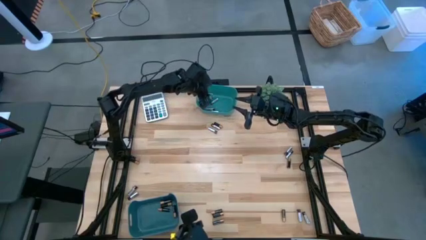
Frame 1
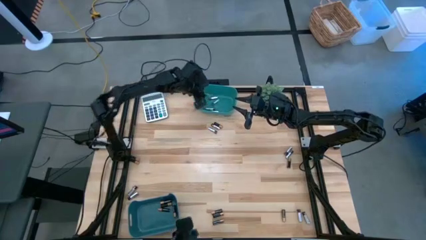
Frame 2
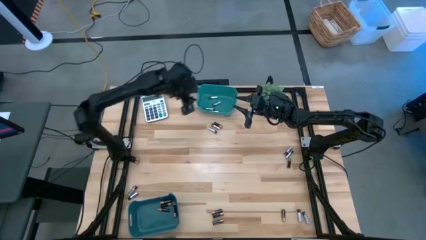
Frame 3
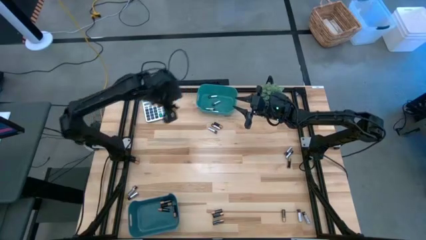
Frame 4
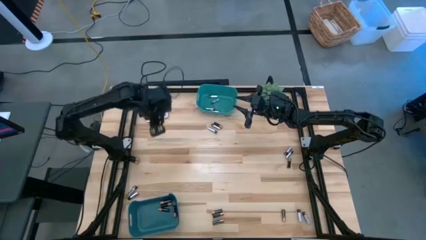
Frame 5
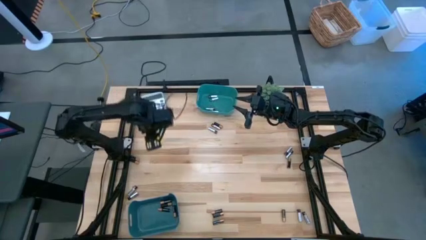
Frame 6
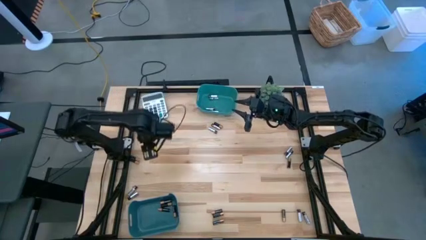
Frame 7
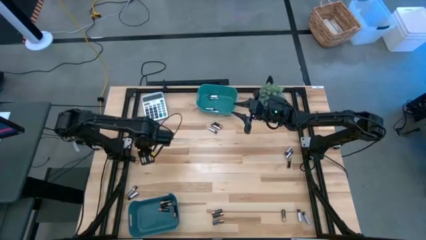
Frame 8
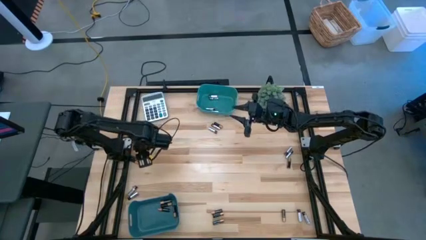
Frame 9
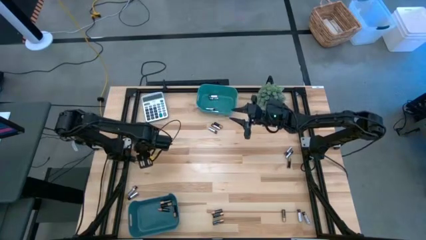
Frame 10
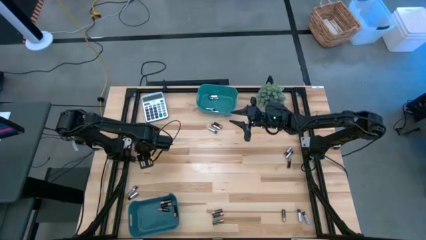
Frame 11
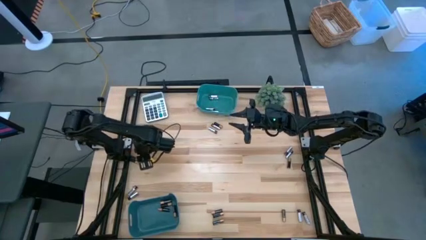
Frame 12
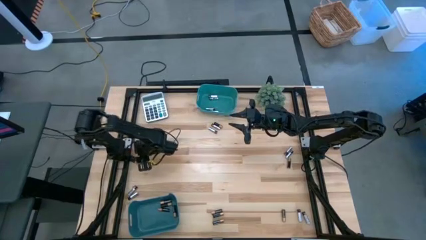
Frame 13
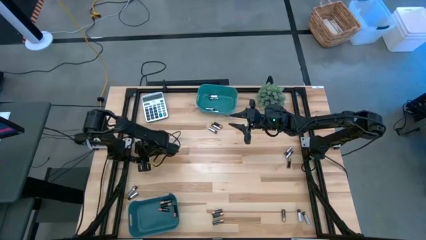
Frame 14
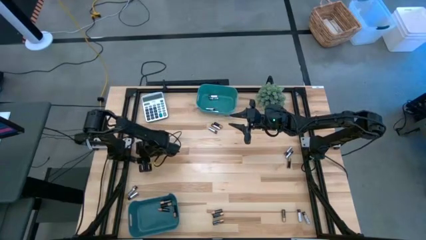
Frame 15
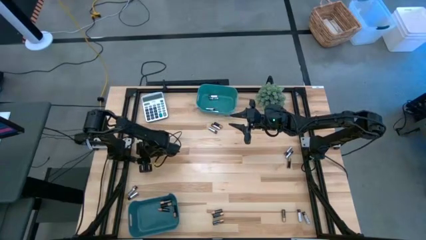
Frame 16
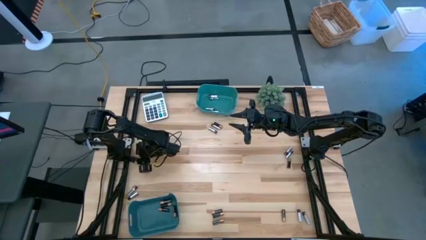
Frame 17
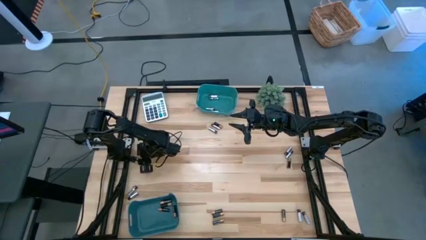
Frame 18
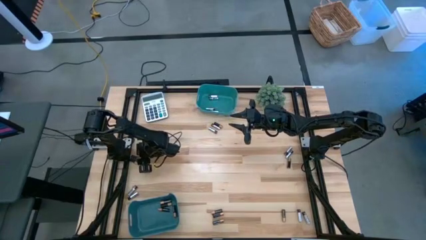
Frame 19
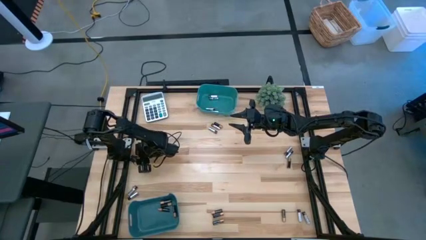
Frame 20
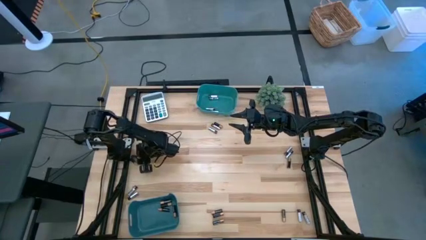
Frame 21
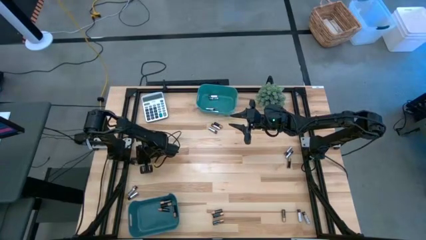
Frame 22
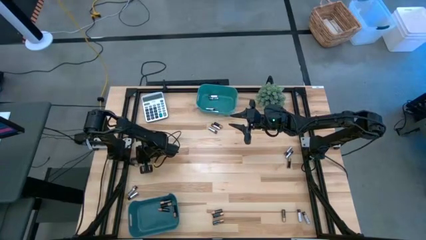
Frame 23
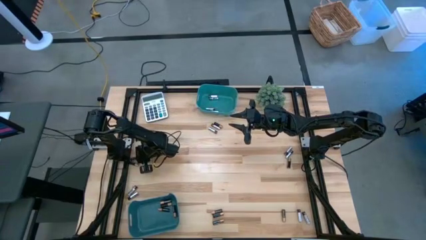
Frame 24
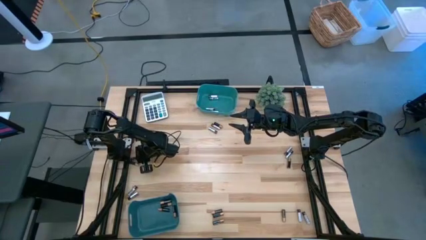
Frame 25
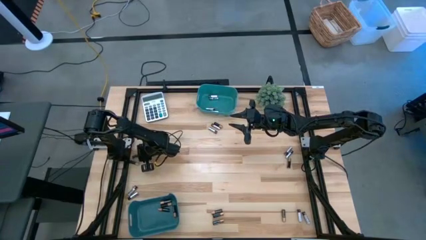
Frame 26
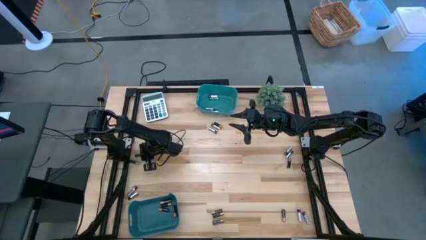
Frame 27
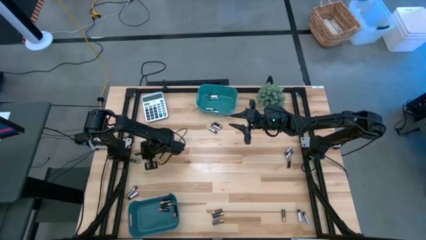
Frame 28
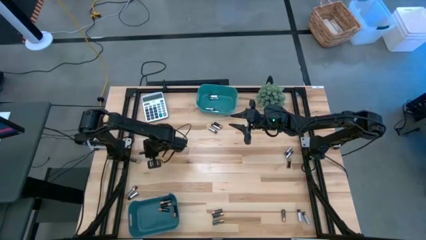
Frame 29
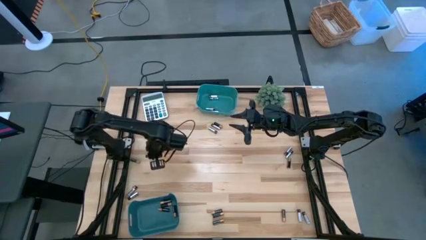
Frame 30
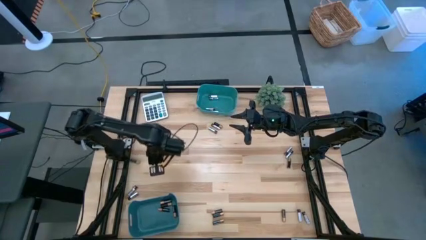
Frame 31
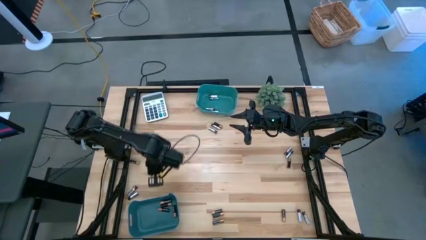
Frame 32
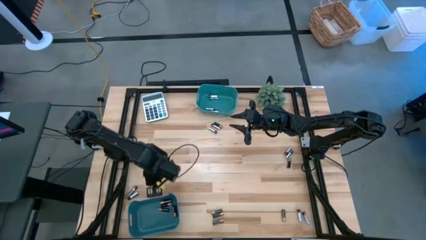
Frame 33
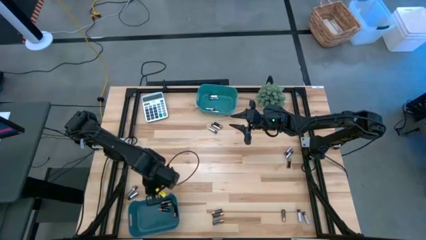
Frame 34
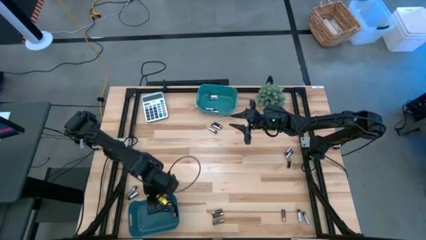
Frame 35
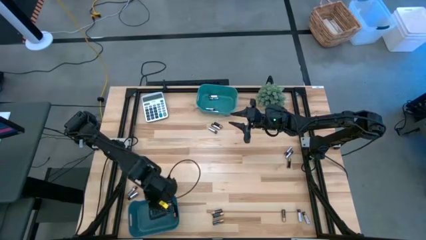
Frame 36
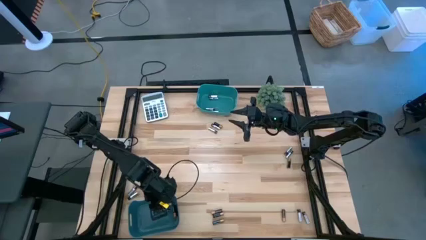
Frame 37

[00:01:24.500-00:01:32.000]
Task: Sort batteries
Put the gold battery into the bottom green bin

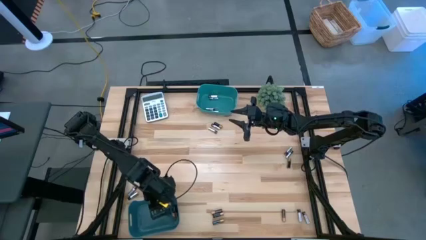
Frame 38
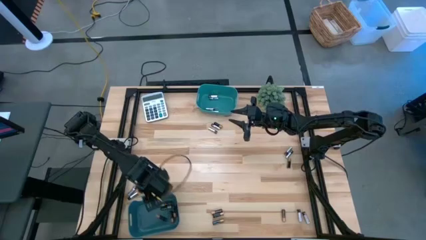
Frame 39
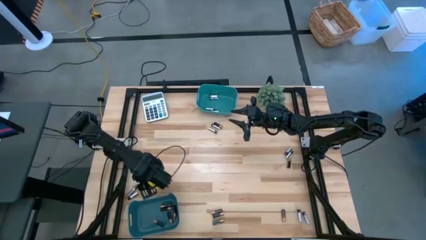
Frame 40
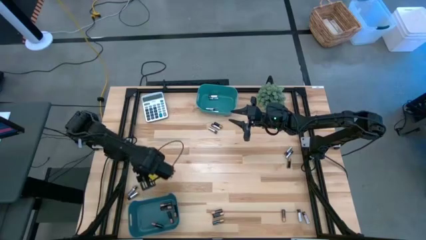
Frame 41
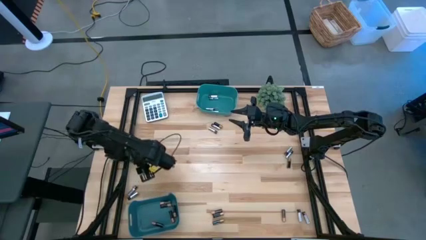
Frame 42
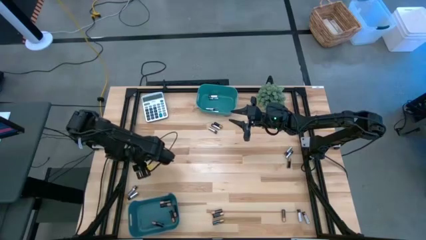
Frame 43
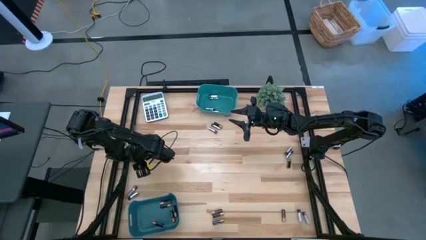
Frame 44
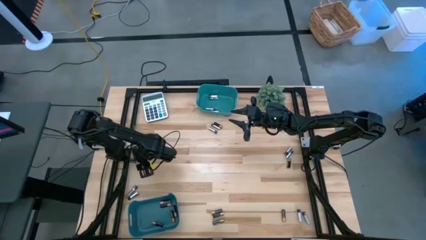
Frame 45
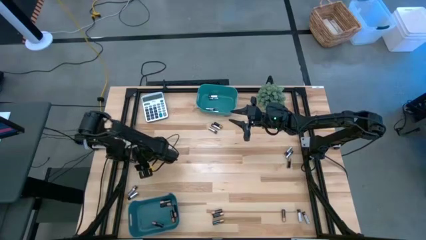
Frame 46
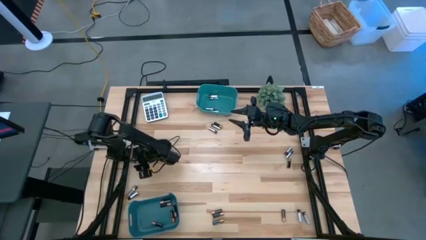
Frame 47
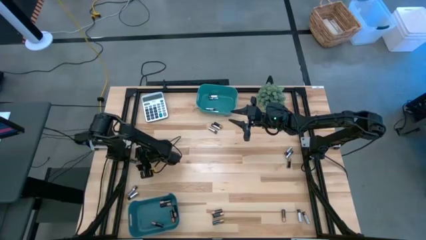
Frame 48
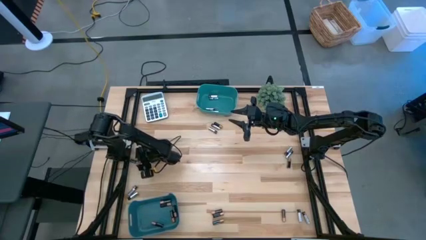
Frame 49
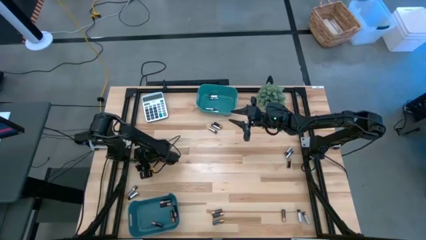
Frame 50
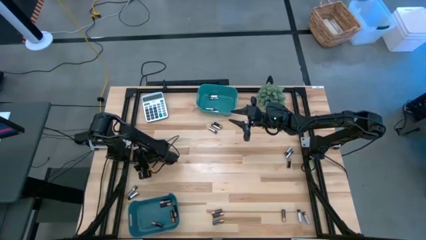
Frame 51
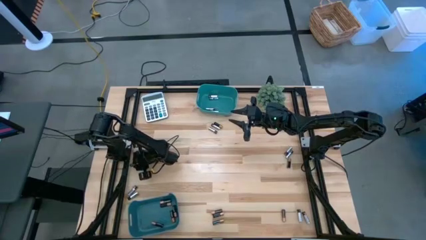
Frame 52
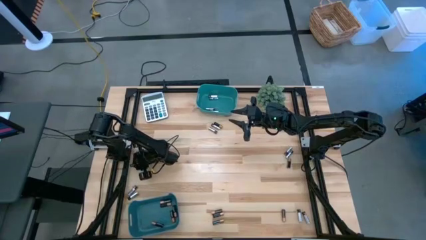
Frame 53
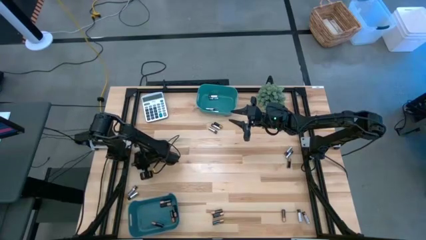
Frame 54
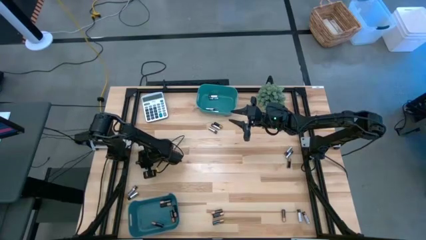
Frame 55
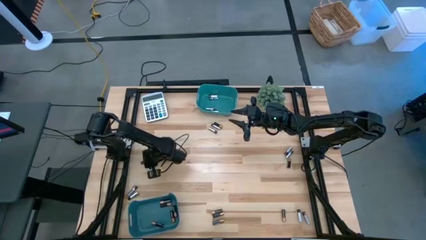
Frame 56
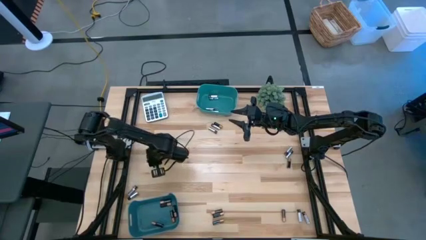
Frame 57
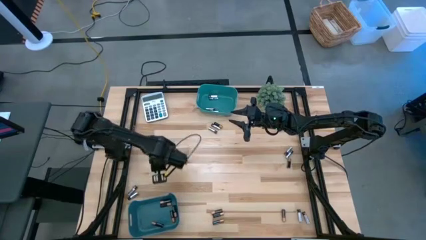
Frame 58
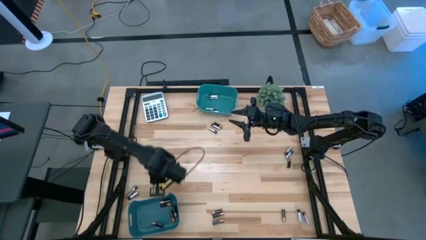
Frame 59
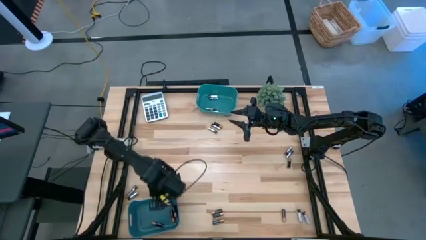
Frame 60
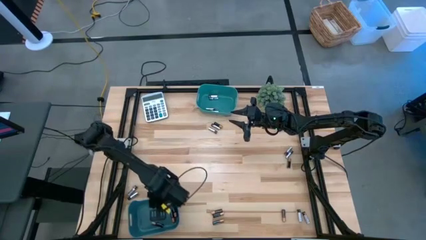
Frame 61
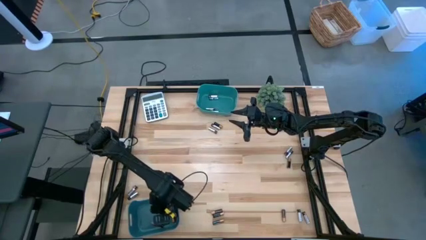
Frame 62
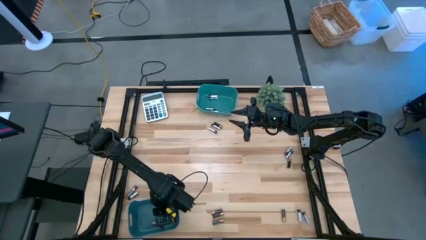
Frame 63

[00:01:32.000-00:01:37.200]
Put the gold battery into the bottom green bin

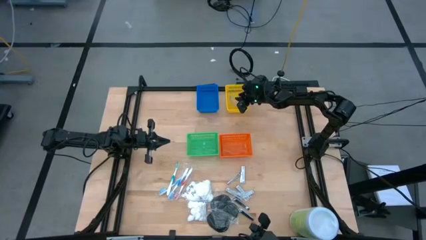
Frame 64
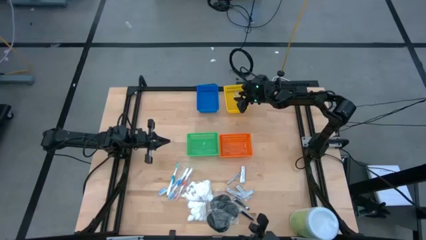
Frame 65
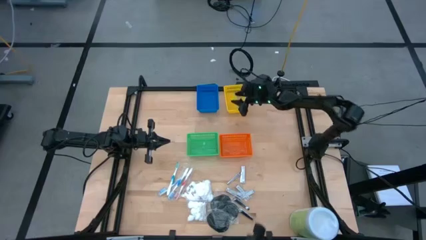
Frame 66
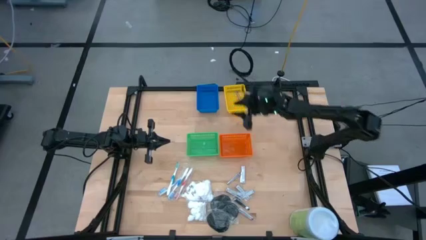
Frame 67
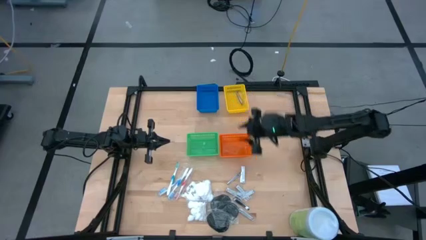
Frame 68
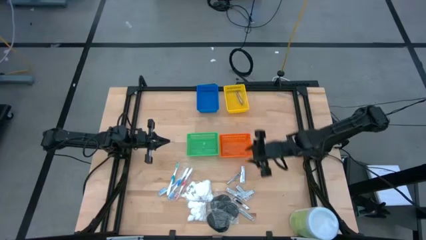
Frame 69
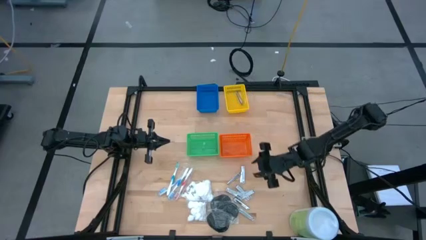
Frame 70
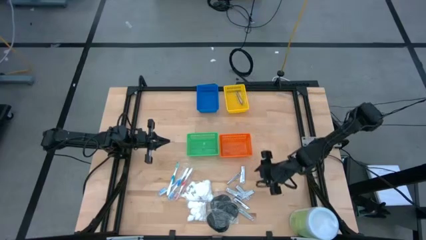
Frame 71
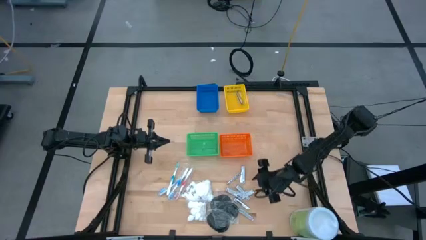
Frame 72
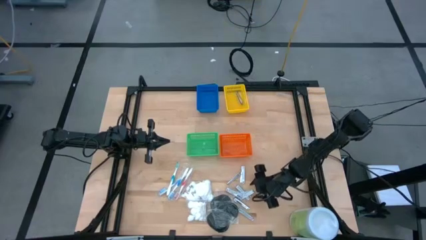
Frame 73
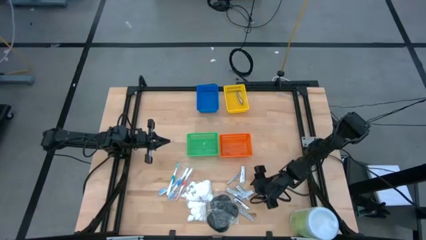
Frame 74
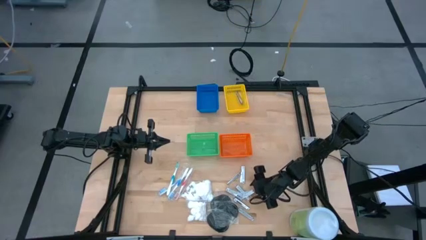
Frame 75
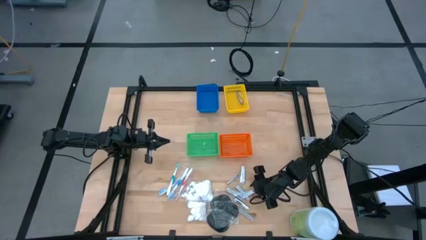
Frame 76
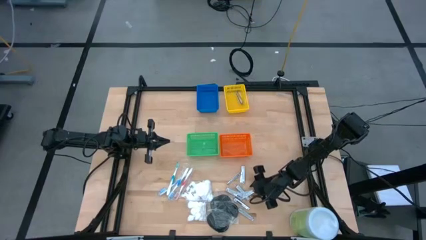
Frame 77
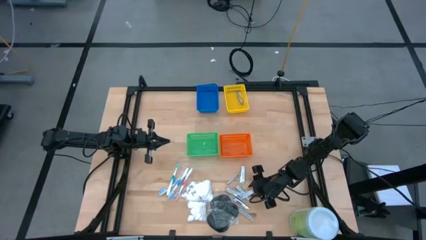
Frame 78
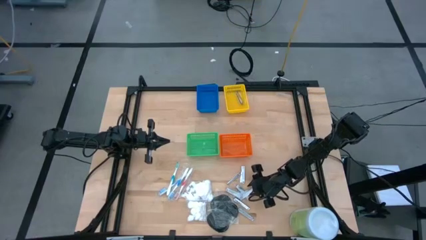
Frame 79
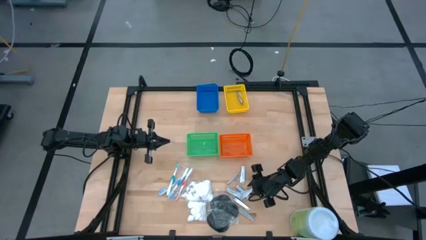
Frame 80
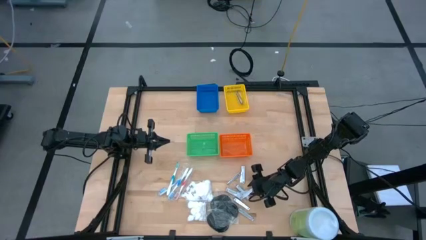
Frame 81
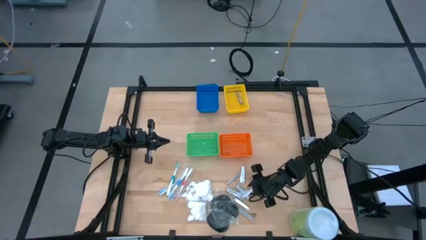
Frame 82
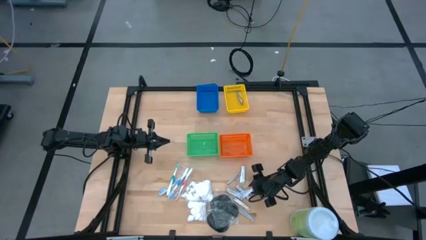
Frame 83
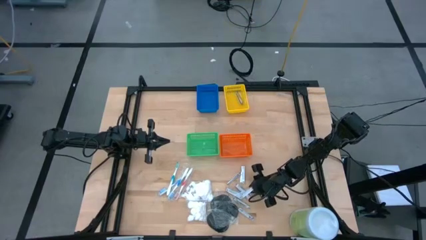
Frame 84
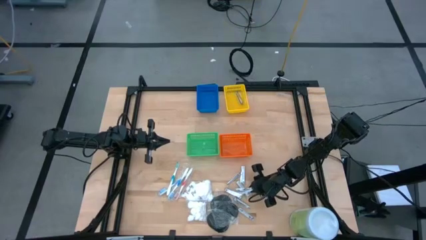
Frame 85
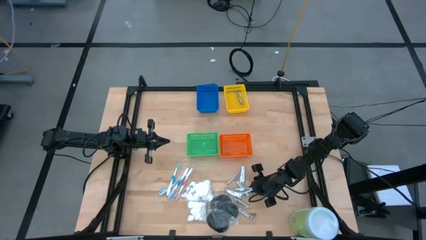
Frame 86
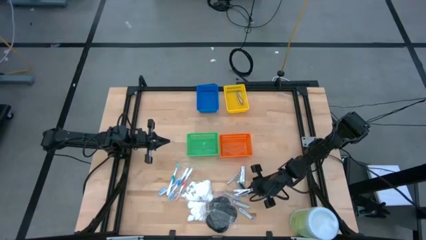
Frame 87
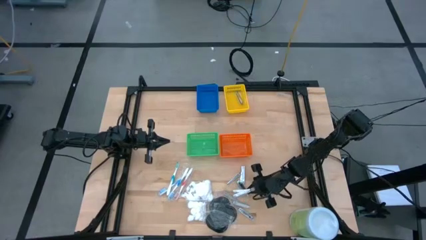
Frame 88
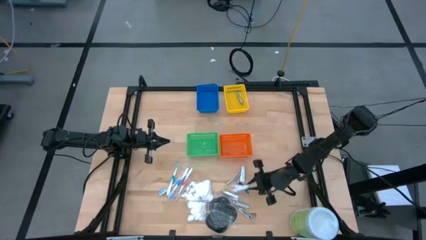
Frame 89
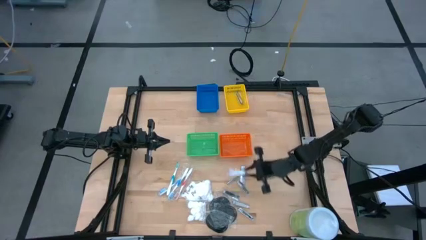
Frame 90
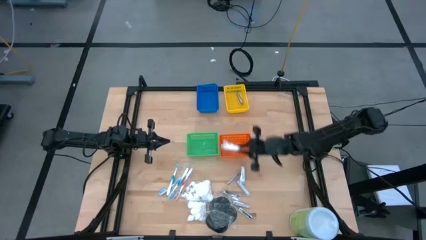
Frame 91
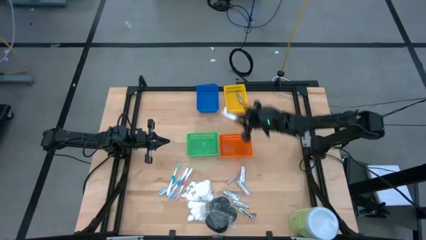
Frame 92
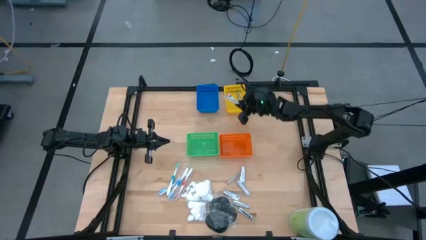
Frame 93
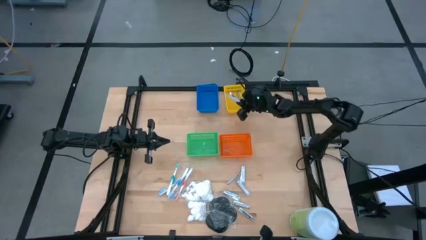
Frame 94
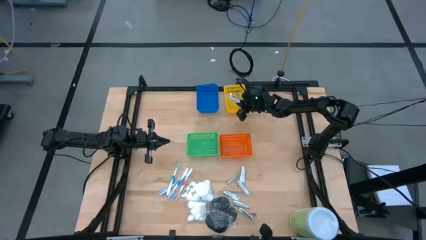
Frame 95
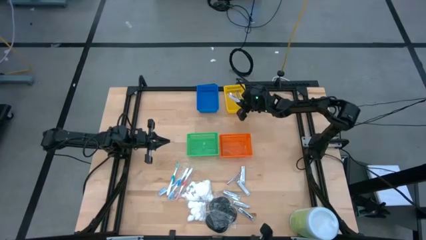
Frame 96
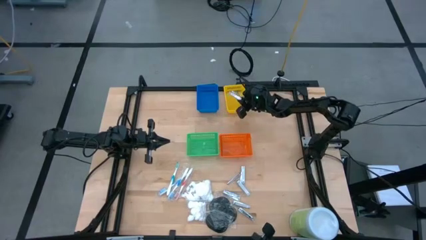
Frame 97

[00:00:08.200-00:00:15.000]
Task: Pick & Place Travel size toiletries
Put the nail cutter into the yellow bin
